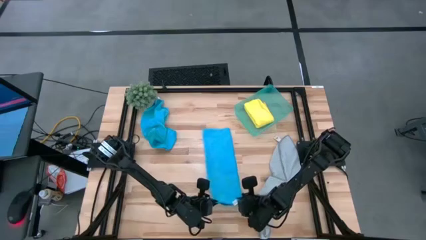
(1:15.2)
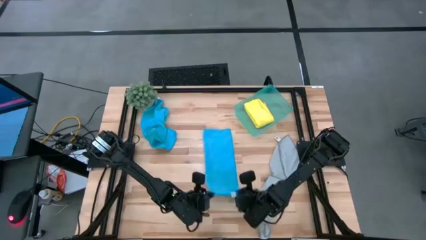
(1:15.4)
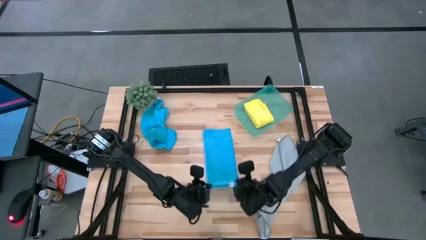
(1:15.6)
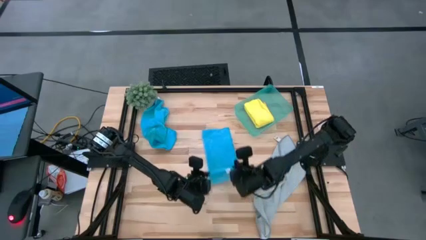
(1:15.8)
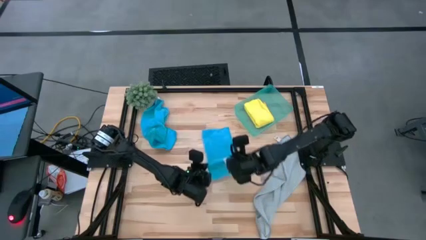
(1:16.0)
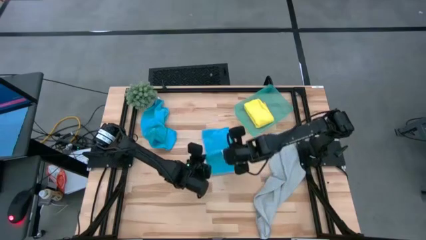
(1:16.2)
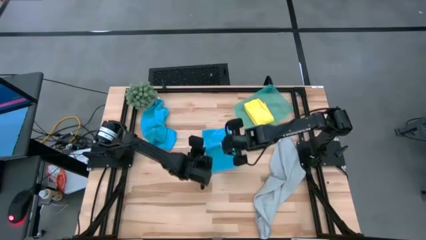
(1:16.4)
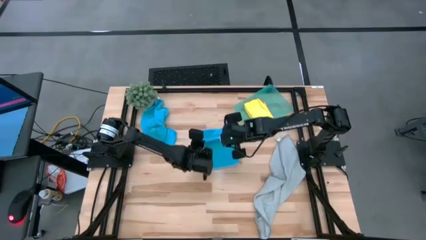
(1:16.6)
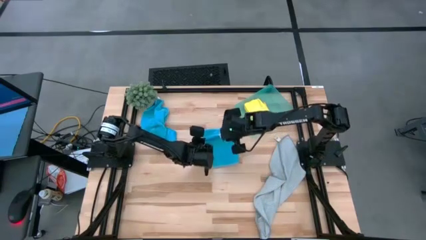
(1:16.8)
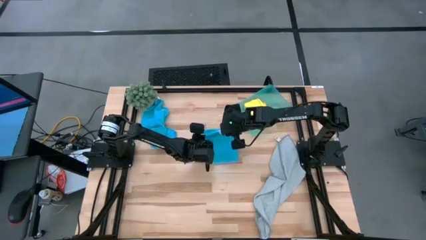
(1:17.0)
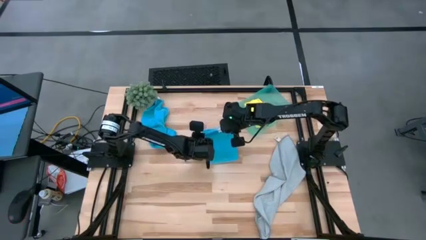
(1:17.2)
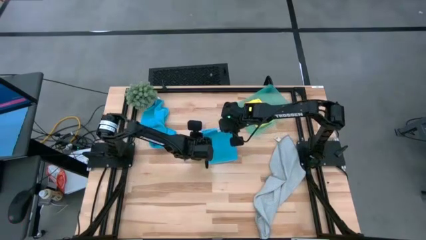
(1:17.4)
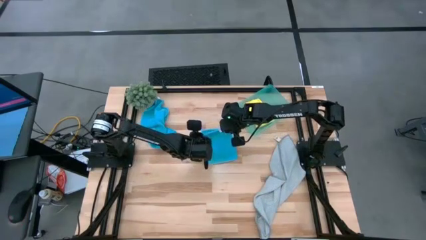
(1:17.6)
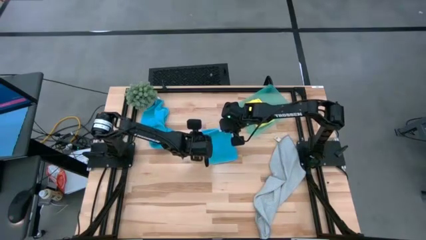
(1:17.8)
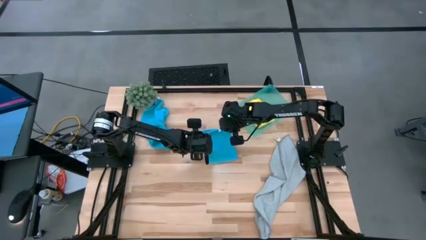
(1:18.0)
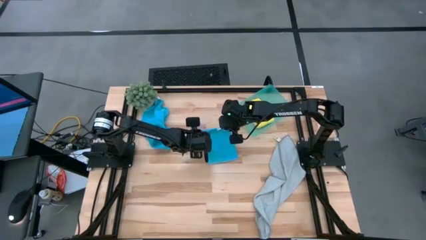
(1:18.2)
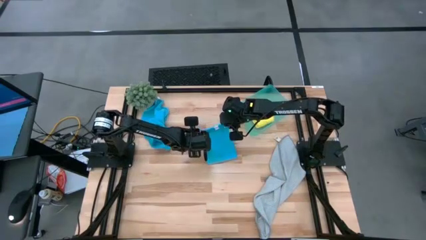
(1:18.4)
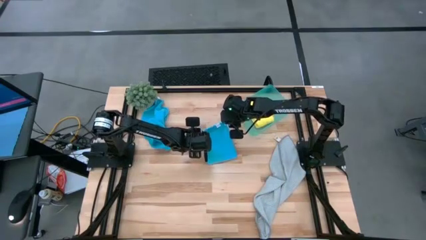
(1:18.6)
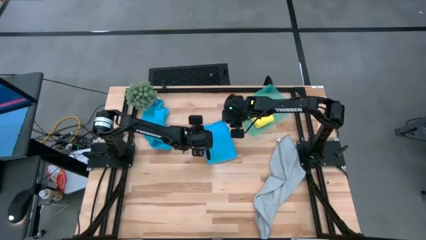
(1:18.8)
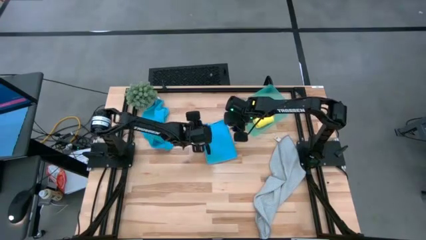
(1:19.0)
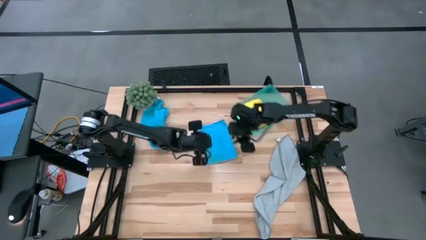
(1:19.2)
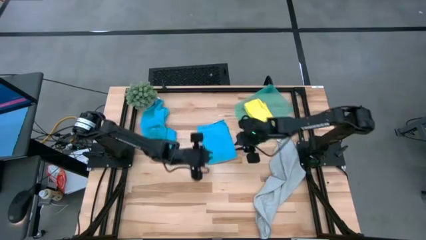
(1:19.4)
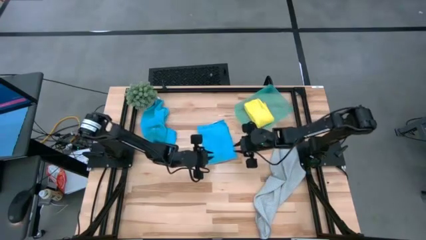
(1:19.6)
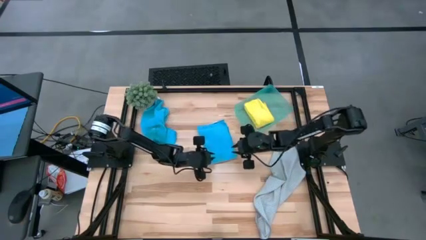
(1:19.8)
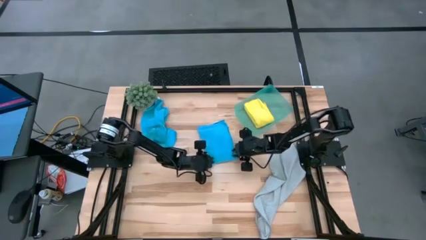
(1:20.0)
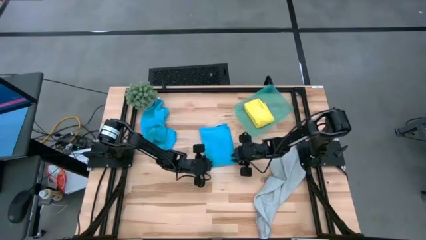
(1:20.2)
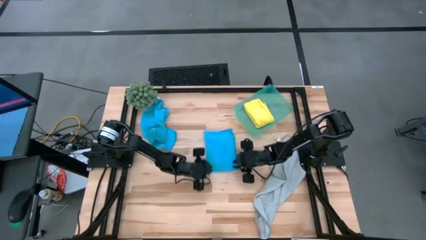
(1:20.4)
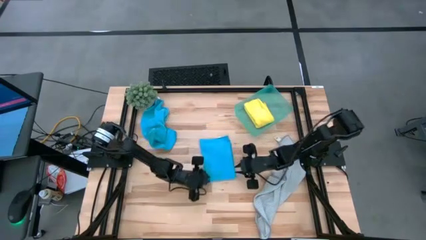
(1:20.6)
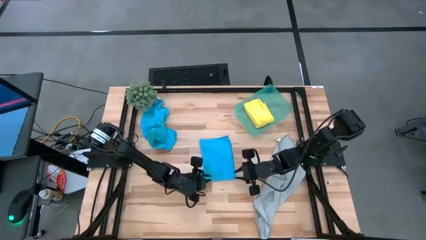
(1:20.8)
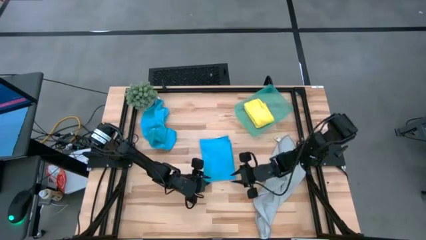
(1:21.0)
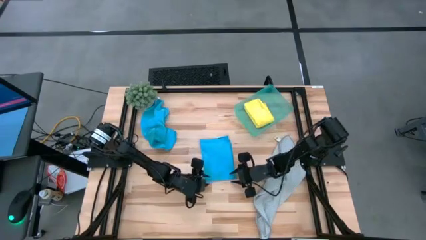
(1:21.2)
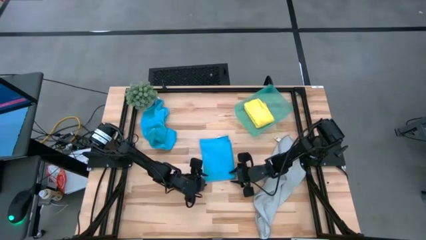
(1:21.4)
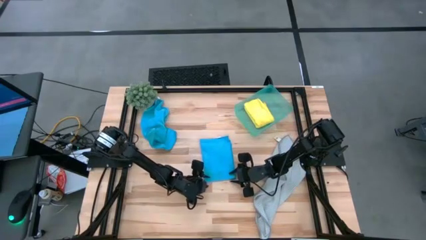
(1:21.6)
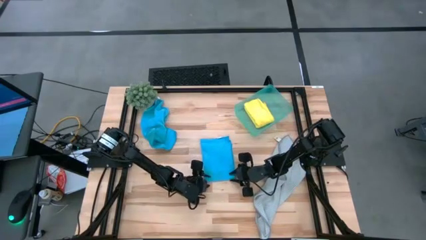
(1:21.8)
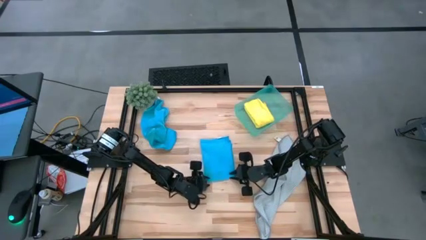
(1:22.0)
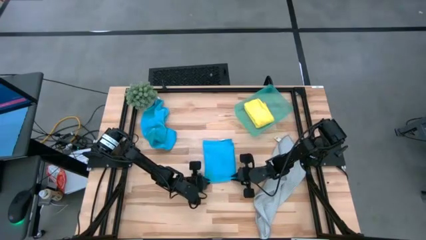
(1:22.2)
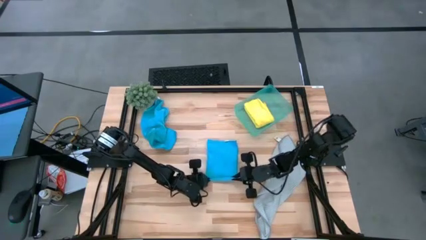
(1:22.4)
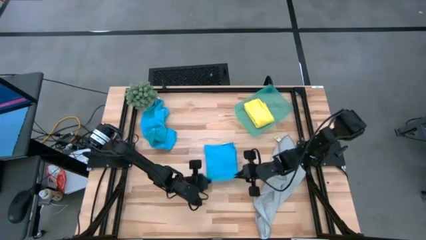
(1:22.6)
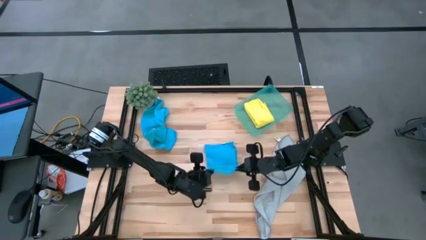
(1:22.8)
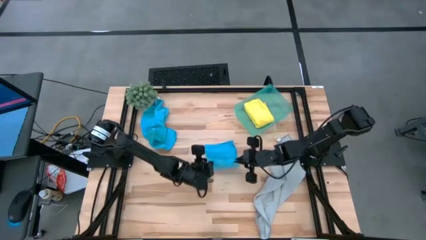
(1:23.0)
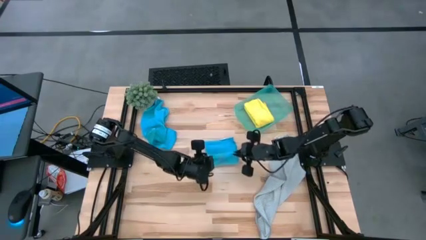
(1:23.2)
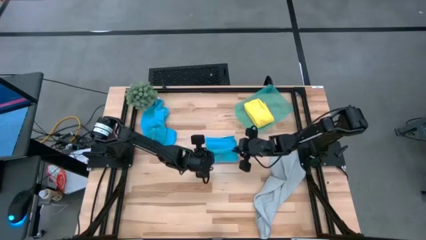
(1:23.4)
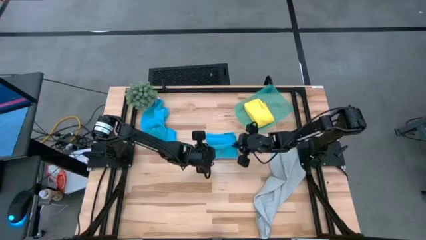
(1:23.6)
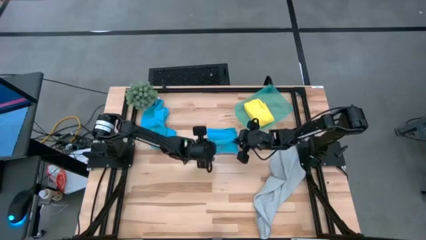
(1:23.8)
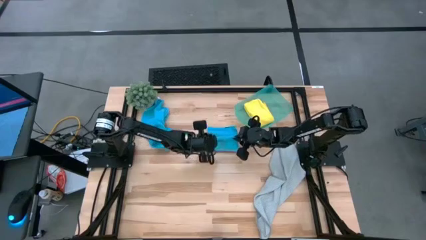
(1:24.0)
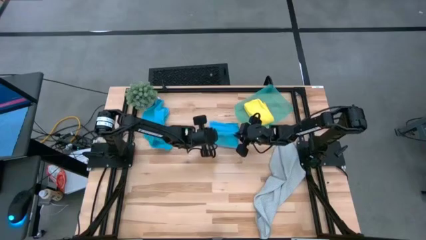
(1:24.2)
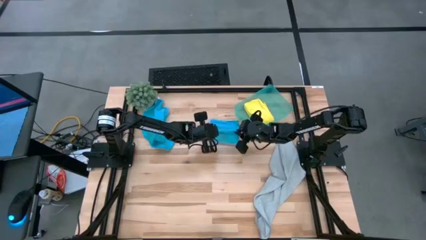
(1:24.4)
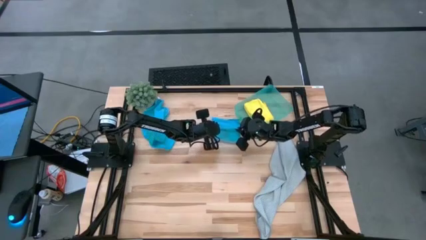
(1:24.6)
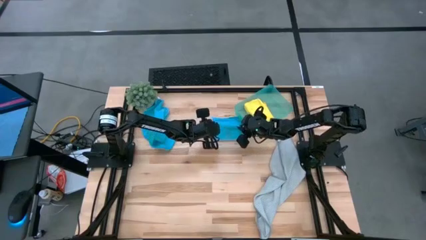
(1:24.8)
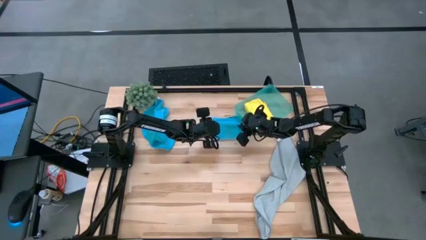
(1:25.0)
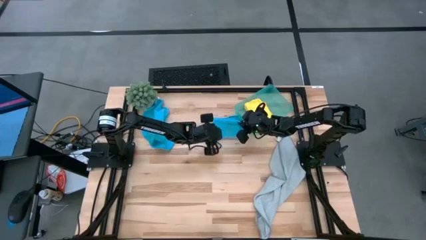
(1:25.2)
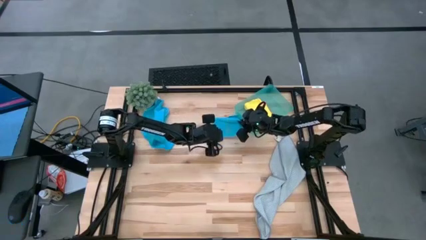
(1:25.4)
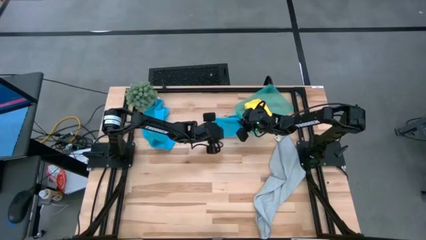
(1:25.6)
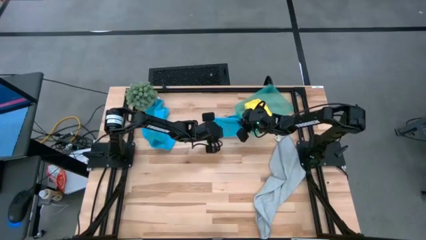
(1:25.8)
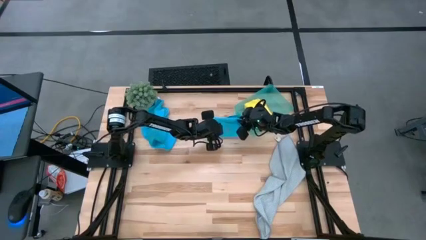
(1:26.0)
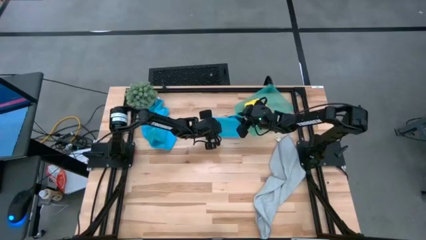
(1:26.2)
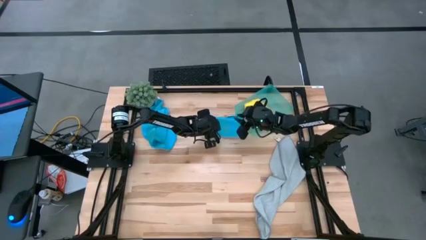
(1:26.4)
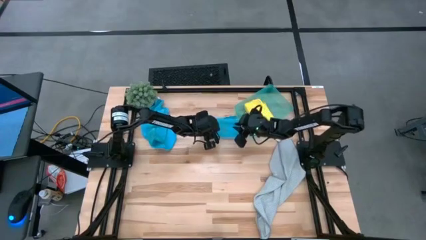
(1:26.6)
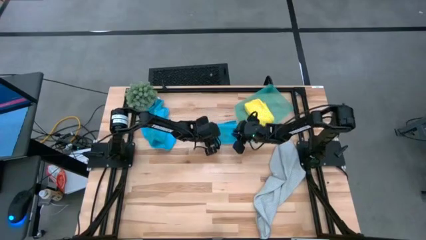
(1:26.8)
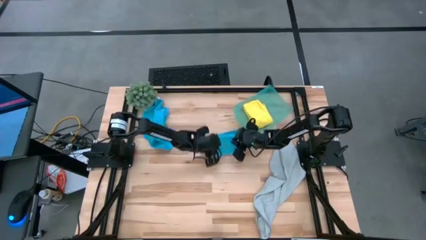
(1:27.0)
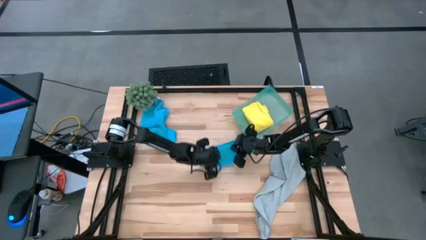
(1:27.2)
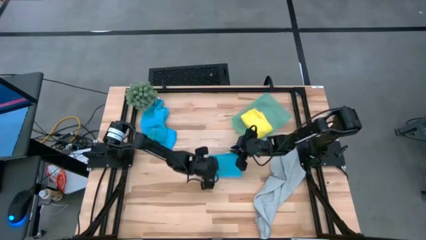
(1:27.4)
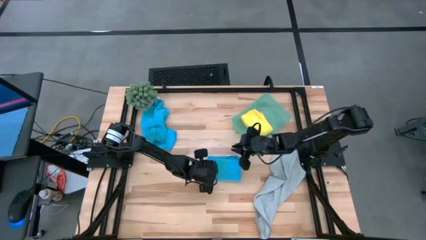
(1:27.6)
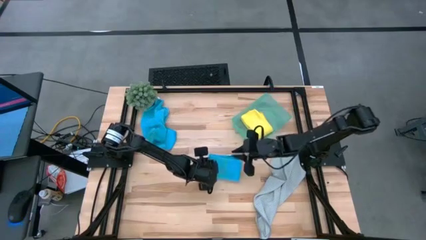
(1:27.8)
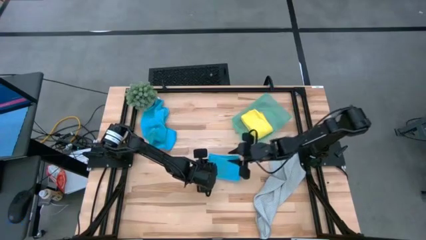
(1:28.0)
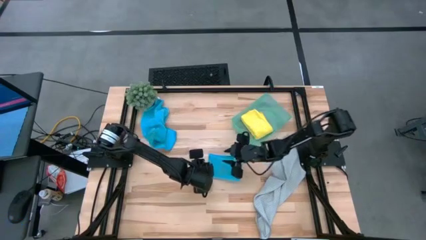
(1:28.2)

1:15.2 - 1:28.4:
Task: Fold microfiber towels
Fold the right blue towel

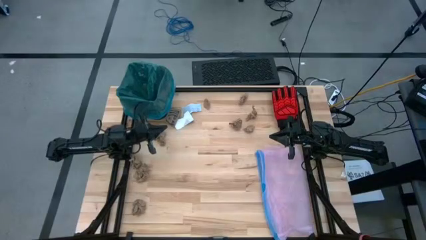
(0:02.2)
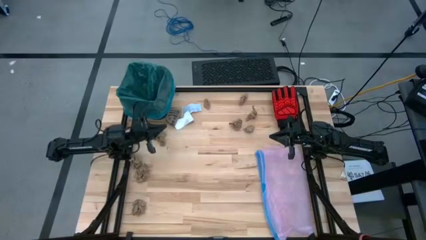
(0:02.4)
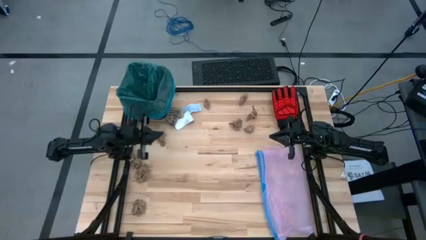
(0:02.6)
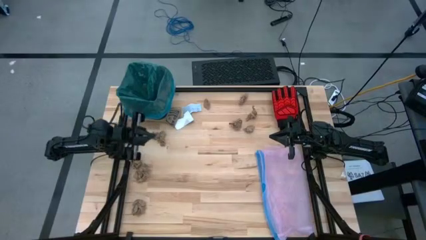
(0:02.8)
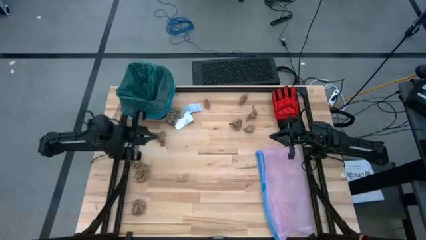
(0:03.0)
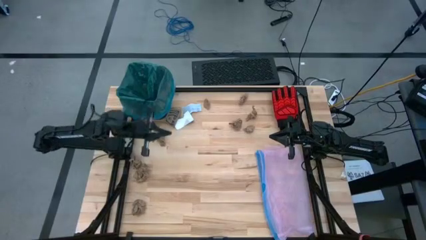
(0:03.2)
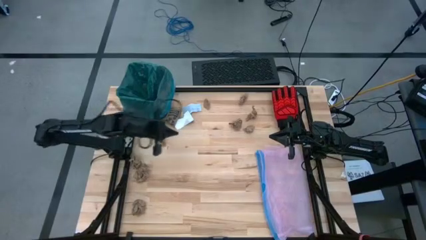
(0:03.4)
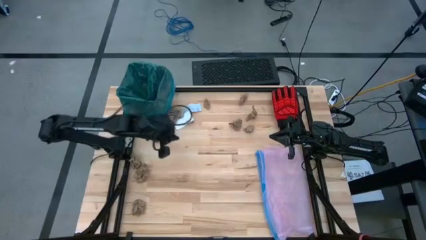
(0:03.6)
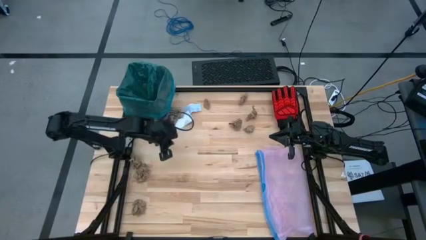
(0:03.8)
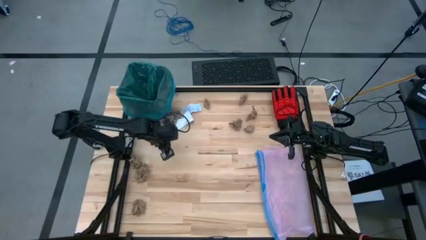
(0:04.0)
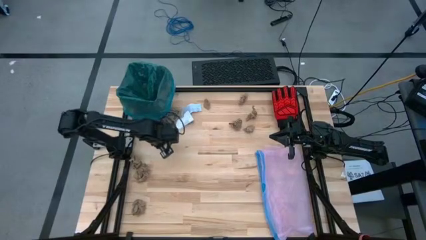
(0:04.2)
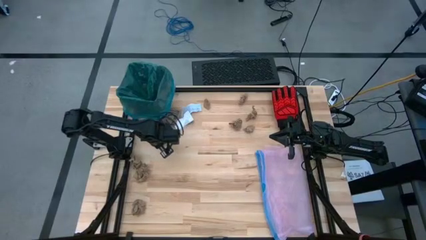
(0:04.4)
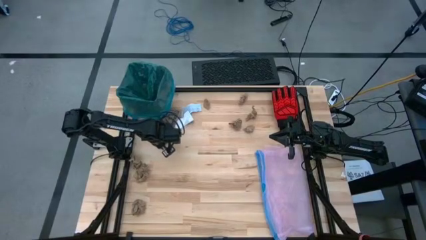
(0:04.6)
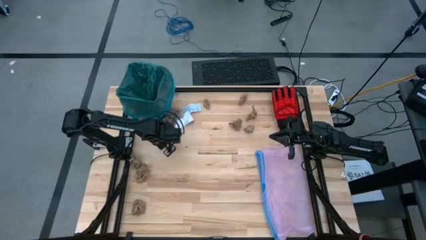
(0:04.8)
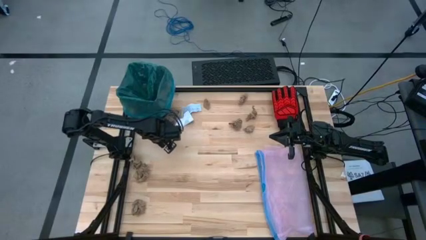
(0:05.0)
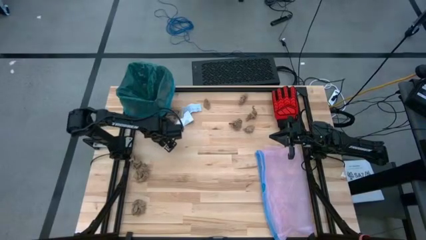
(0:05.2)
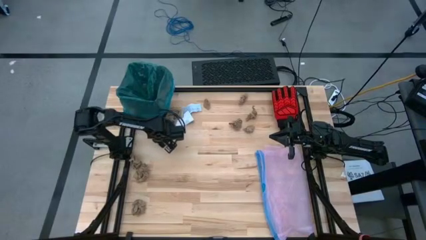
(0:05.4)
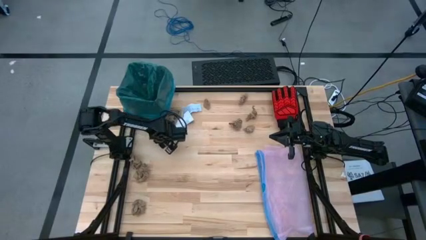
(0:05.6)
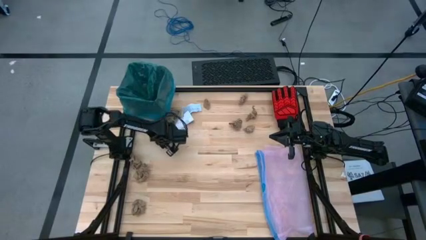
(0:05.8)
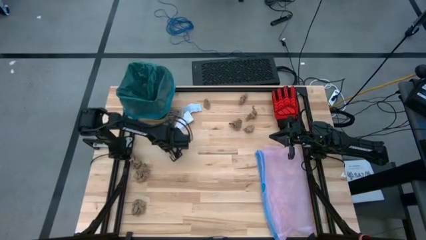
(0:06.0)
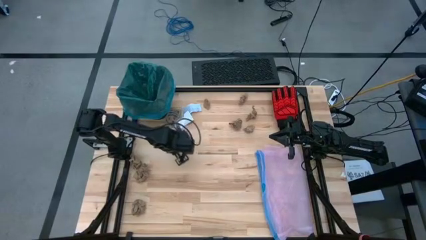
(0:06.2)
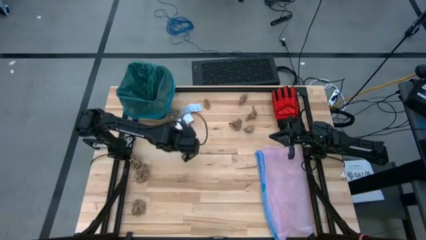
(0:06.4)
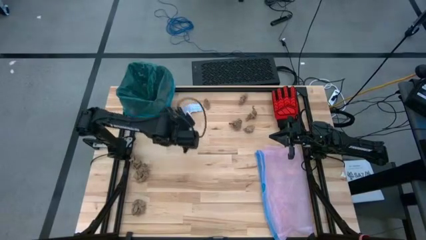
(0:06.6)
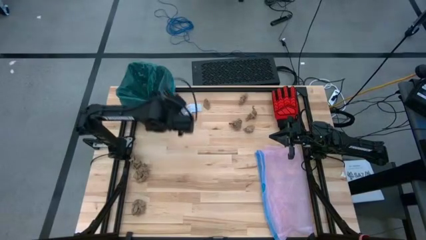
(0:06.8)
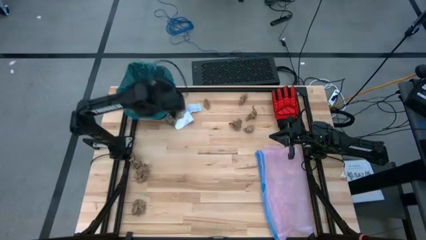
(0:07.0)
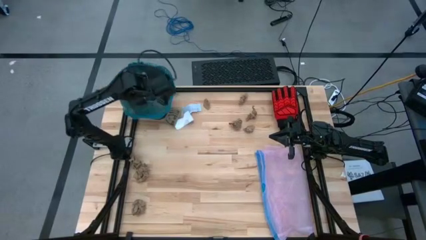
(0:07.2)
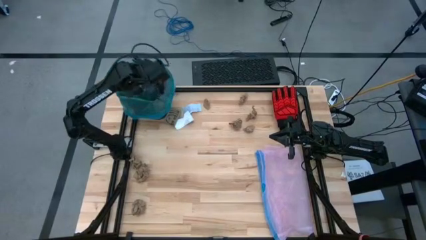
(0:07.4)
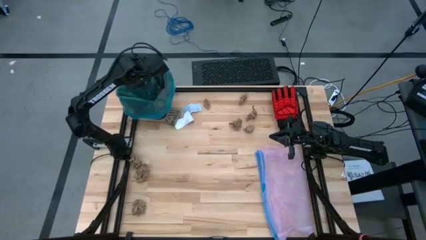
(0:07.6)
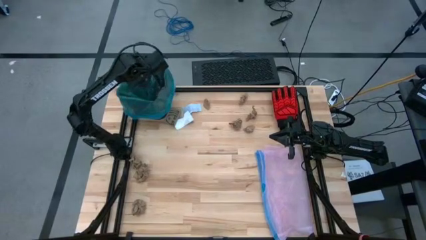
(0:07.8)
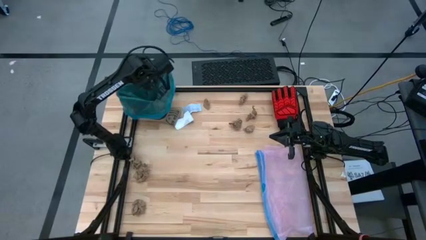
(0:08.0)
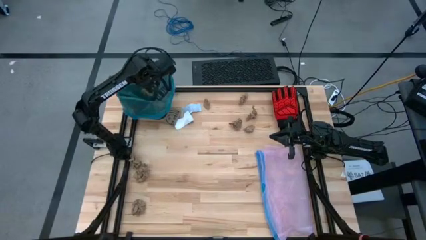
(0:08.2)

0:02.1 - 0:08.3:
Task: place trash/remove bag and relplace
Put the brown paper into the black trash bin
